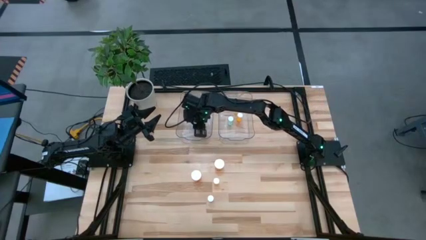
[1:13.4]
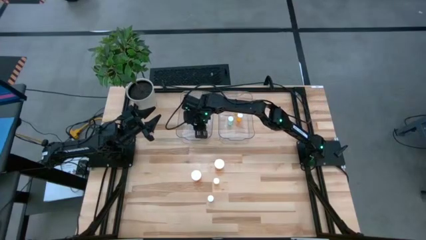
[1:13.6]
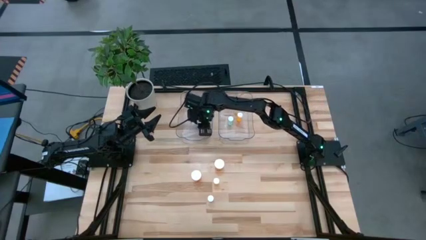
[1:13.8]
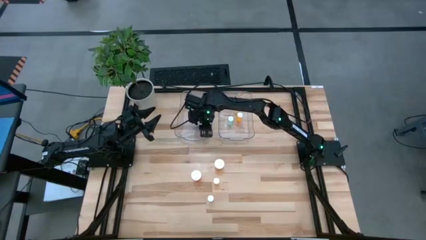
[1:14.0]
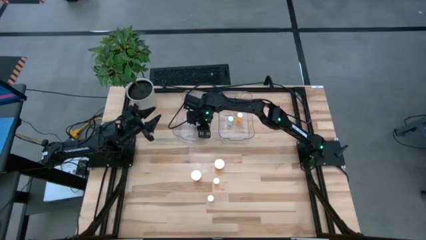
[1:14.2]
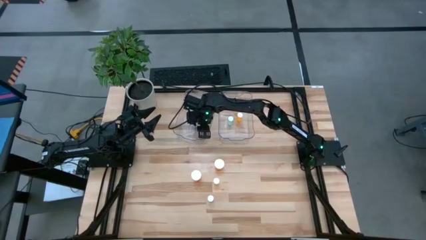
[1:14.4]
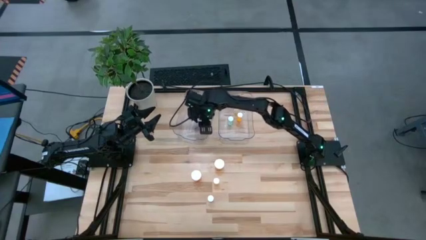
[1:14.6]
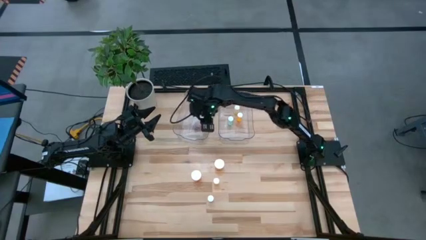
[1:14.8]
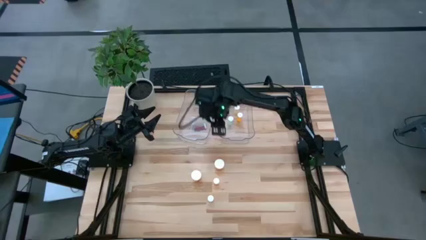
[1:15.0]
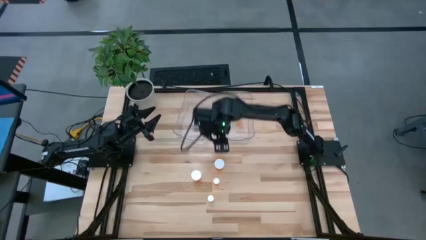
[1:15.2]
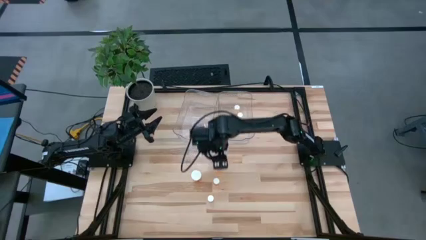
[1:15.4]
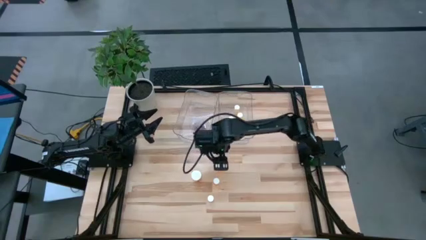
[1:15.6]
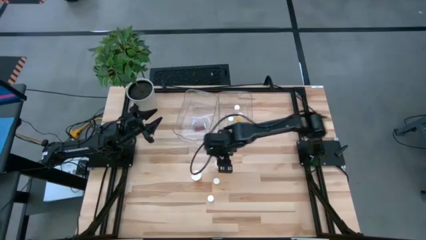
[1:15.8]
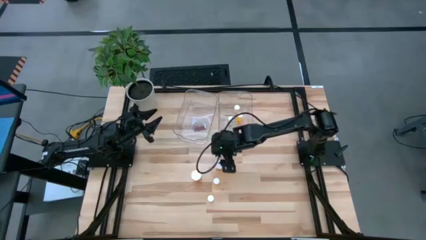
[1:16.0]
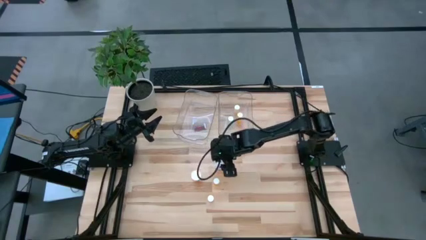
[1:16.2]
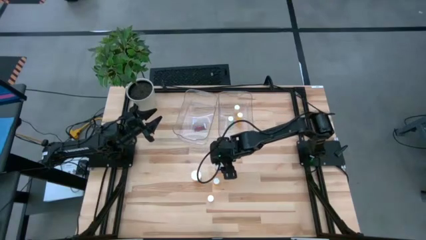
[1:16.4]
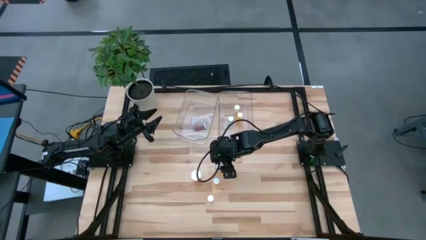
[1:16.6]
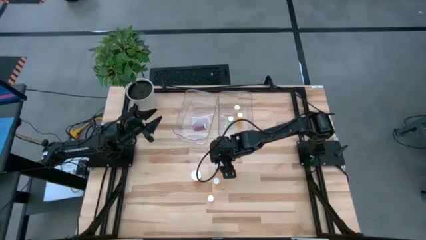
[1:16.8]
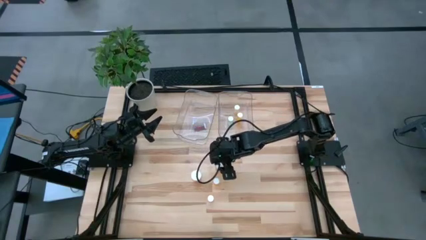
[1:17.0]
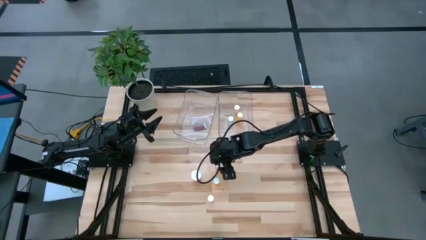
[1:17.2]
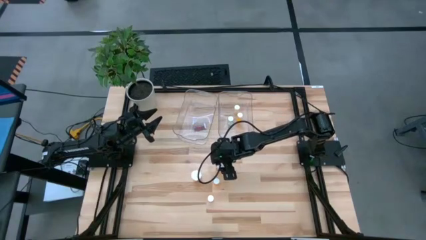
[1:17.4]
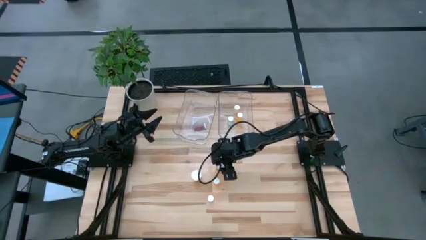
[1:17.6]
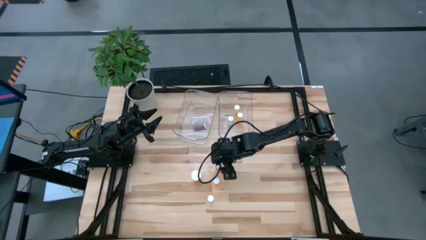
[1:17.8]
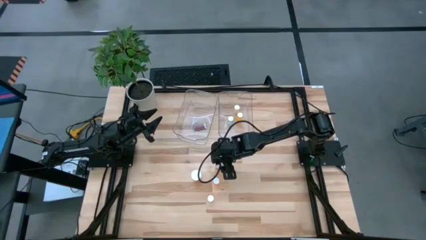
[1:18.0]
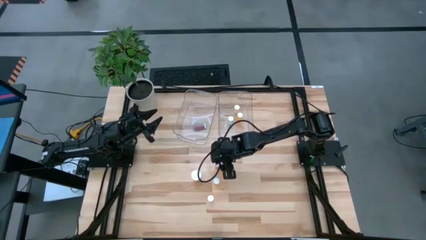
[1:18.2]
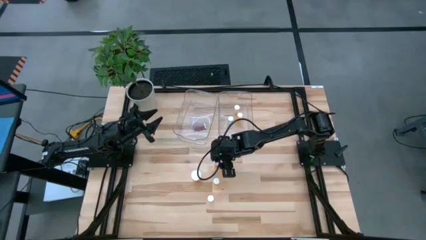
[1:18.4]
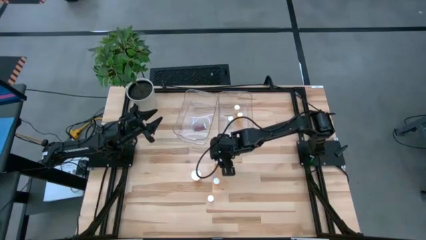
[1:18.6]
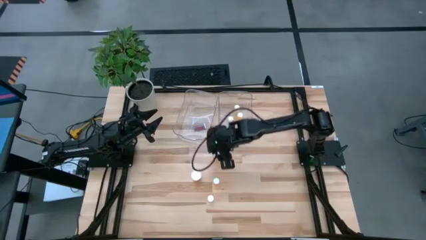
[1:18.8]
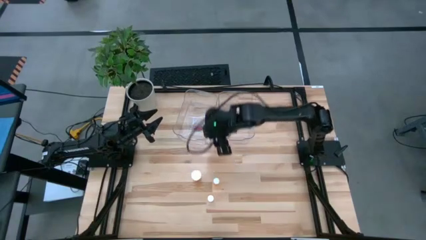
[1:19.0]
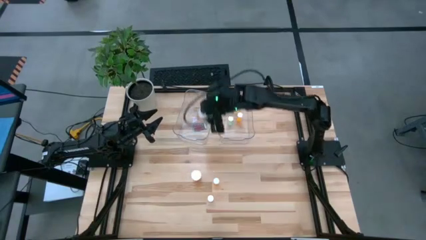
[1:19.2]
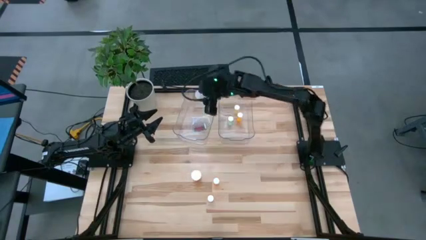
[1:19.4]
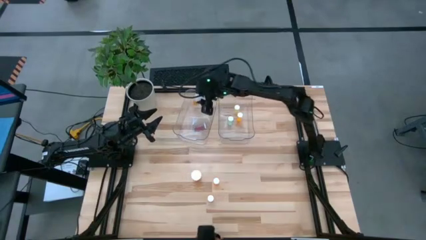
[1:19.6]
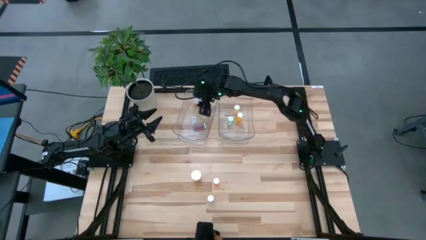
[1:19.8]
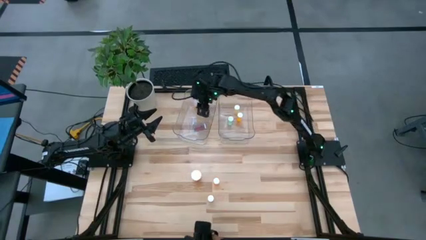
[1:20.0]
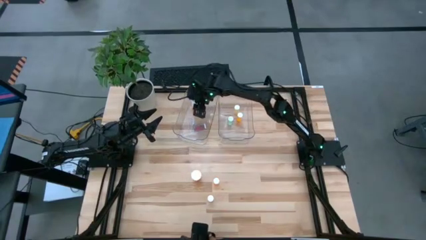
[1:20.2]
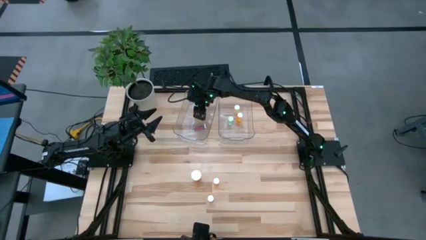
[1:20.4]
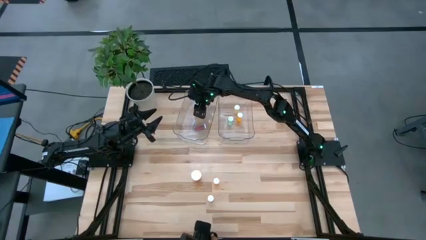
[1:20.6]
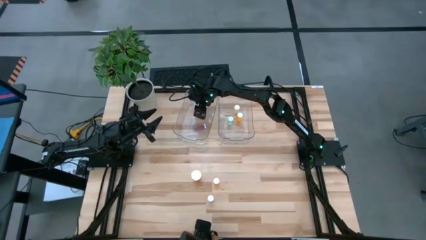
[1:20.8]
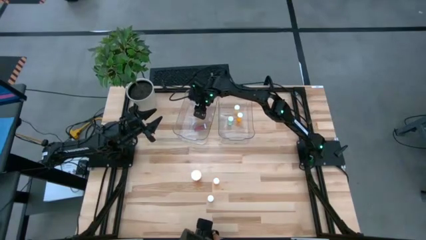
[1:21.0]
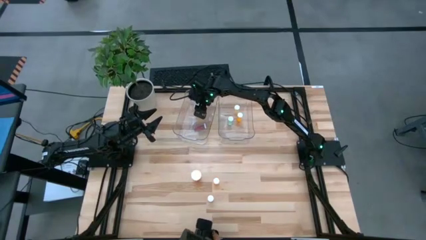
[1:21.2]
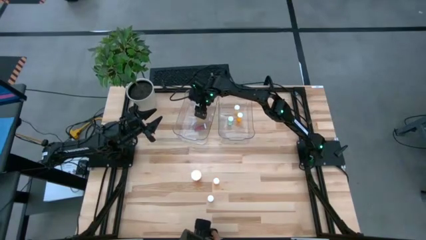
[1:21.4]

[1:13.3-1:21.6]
Task: Pick and place medicine bottles into bin by pill shape (circle, oval)
Put the right big orange capsule bottle into the left transparent bin

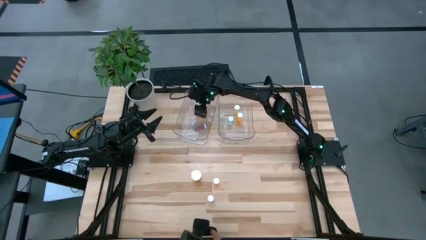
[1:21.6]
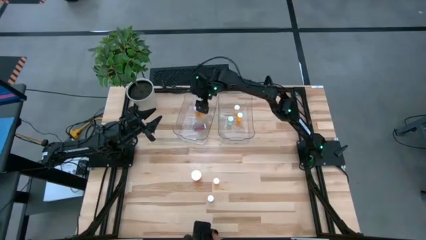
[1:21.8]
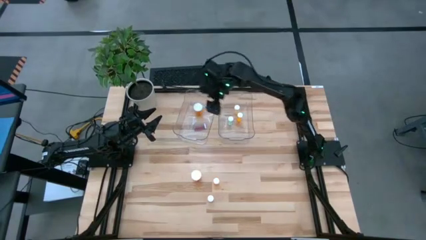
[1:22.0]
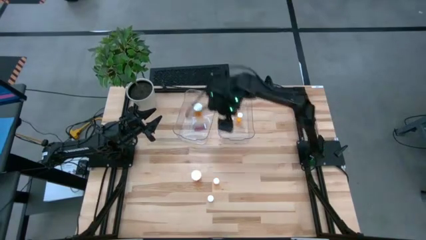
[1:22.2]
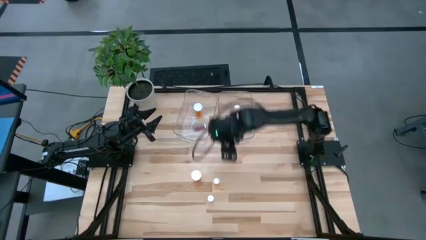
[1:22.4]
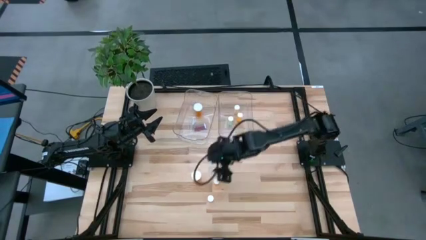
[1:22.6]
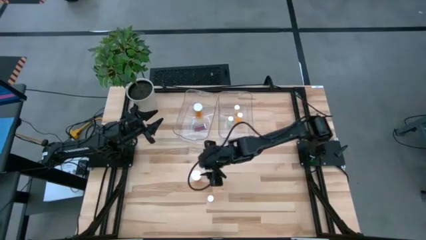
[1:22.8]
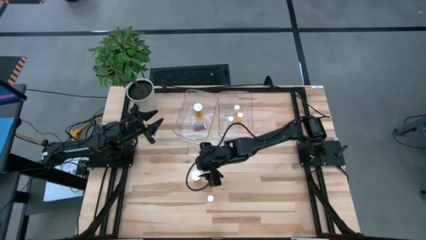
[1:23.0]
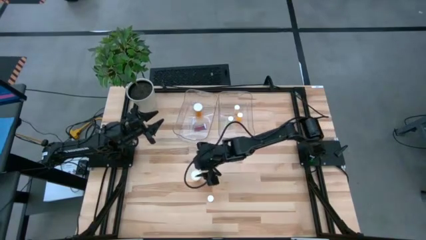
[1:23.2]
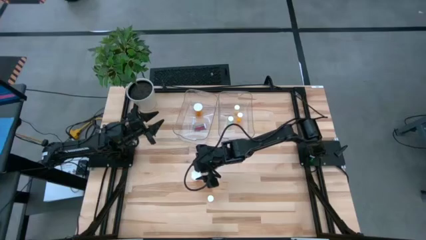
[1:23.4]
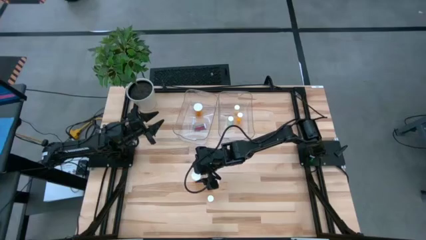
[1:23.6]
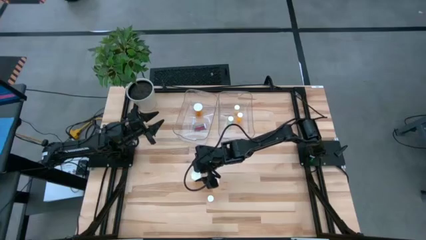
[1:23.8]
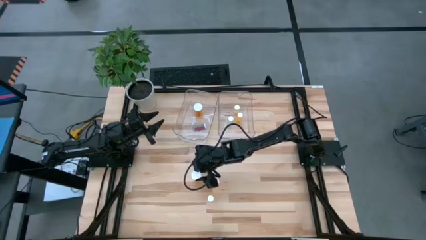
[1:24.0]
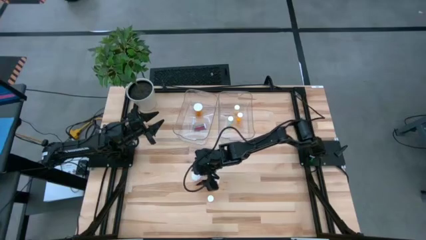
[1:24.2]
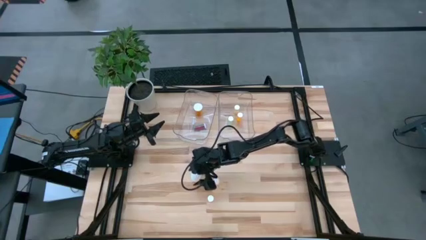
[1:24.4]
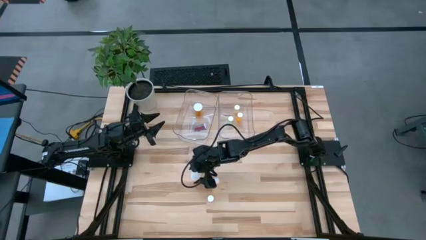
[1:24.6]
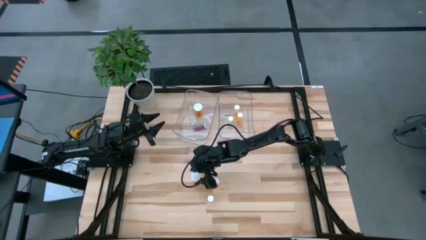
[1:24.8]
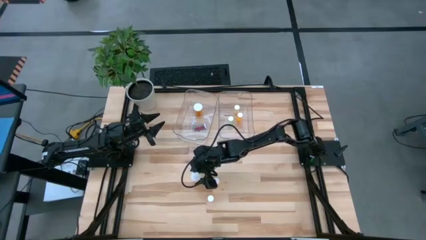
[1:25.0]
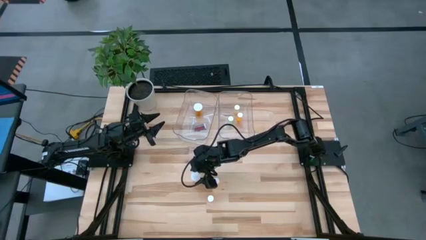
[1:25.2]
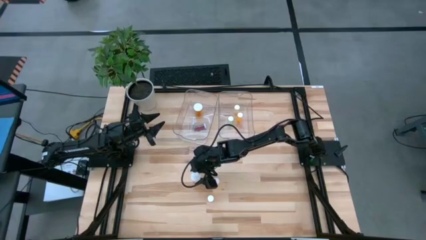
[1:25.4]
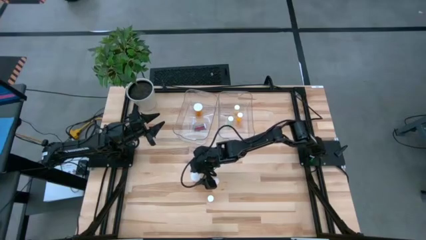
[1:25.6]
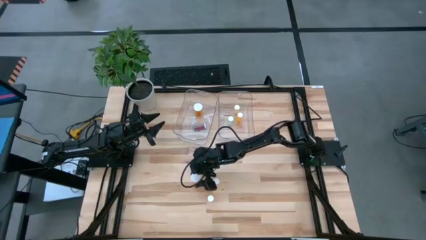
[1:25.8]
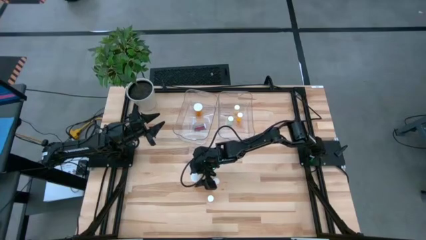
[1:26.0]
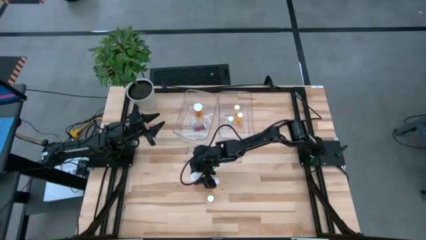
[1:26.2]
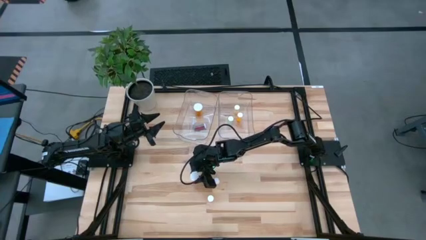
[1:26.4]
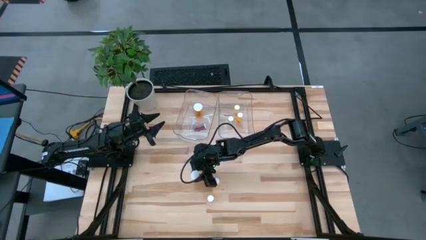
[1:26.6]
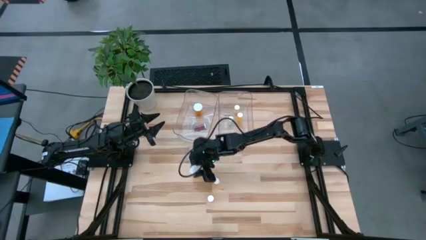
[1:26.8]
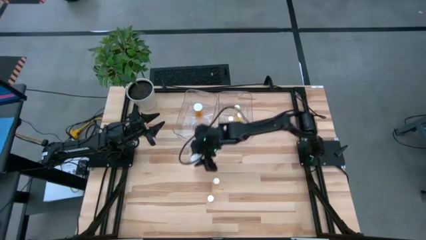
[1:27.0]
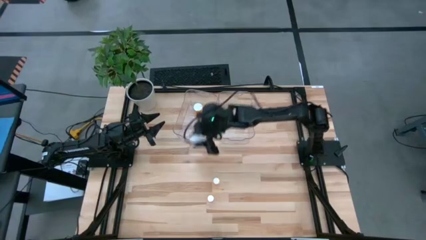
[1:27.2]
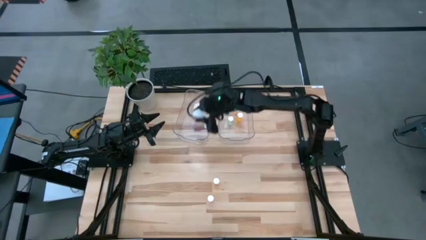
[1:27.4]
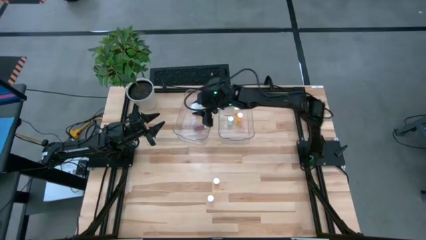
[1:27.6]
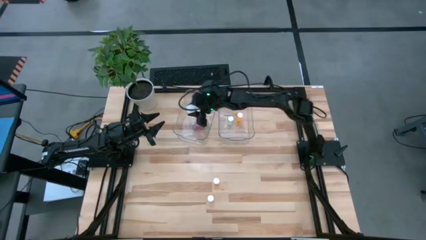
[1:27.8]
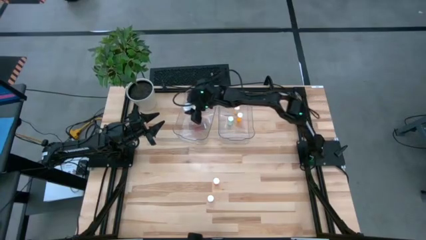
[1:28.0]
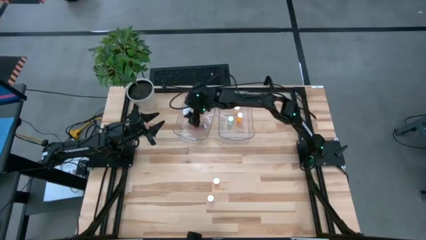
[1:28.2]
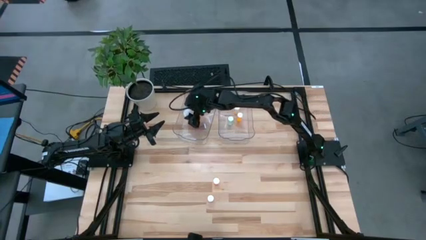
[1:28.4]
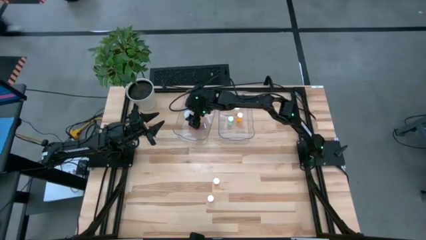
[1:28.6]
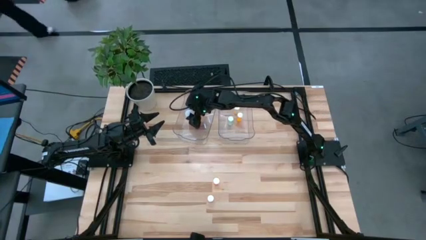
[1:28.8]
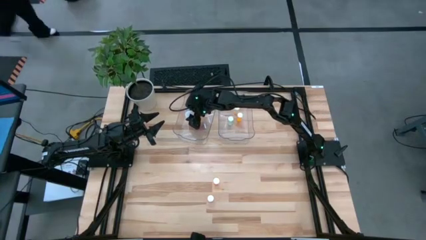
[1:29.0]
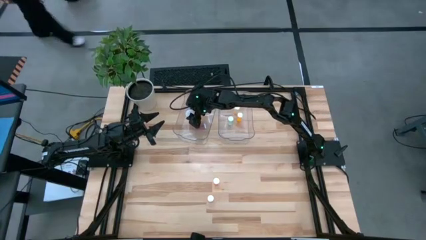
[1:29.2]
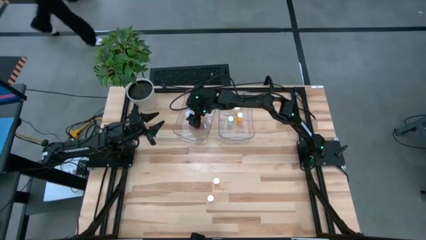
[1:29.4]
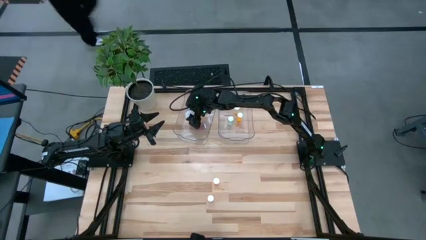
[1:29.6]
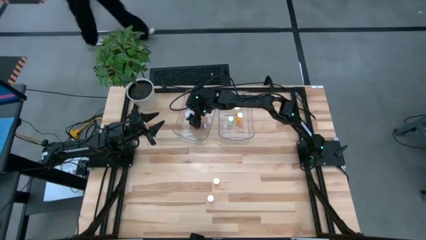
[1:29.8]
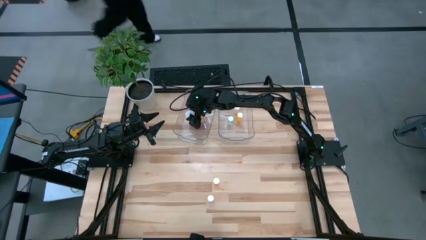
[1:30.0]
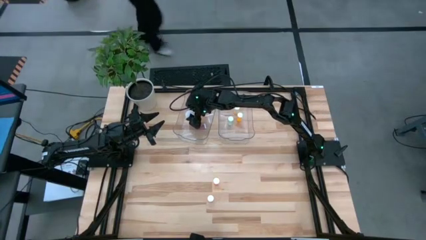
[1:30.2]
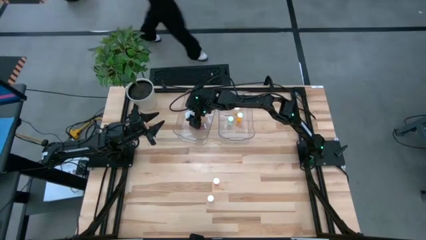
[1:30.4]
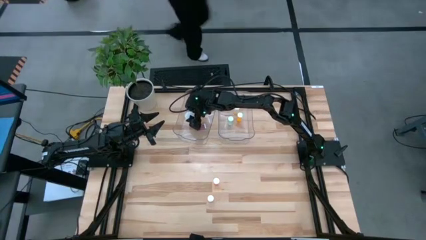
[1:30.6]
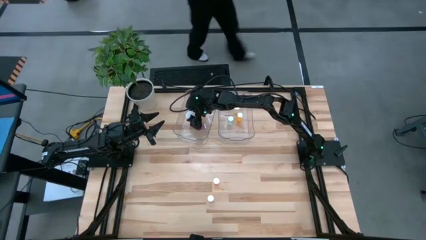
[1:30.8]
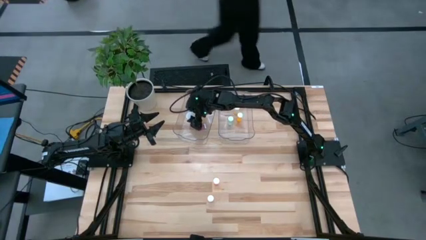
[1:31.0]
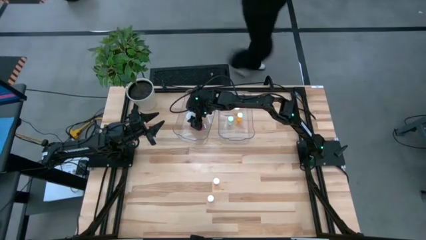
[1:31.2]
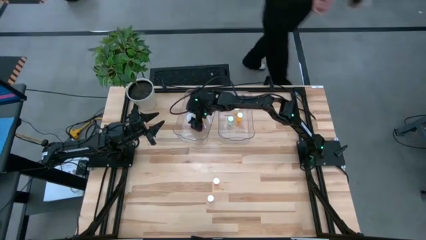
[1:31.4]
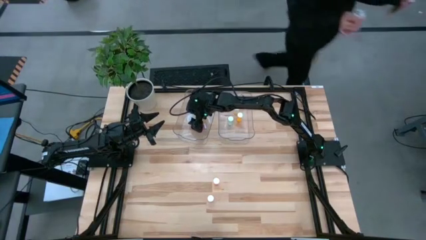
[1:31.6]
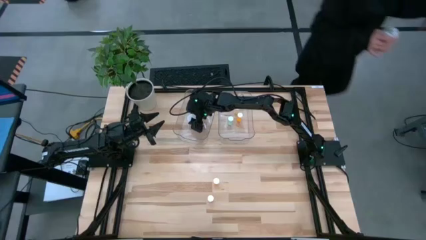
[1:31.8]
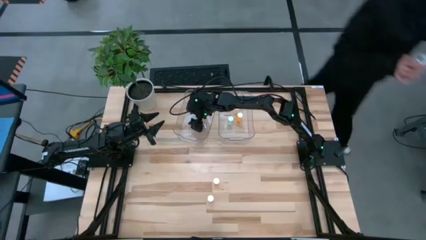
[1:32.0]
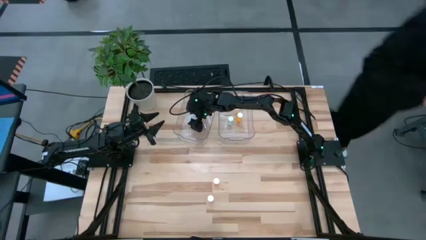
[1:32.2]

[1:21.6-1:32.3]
Put the big orange capsule bottle into the left transparent bin
